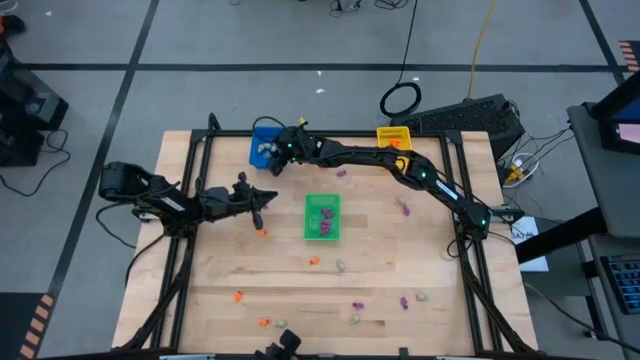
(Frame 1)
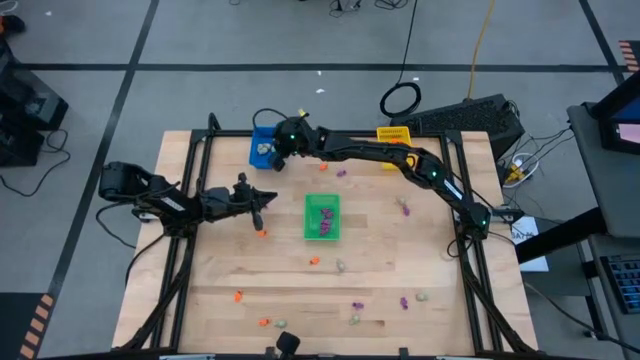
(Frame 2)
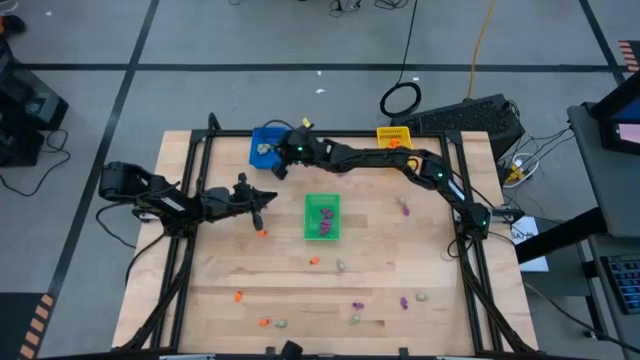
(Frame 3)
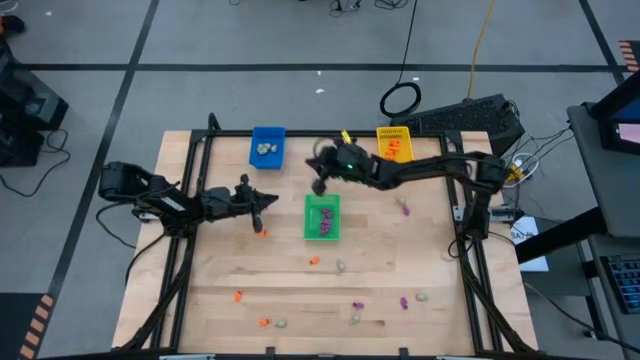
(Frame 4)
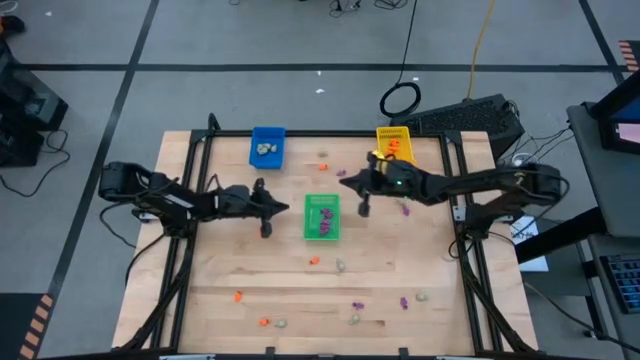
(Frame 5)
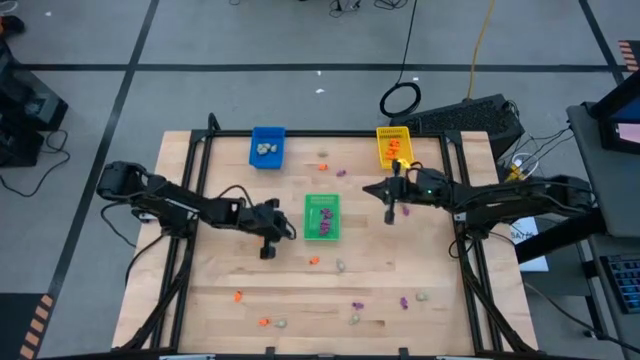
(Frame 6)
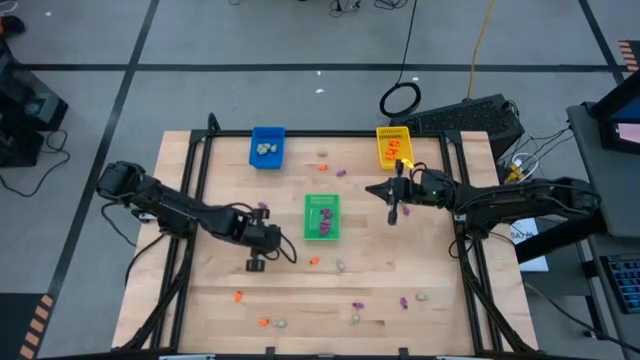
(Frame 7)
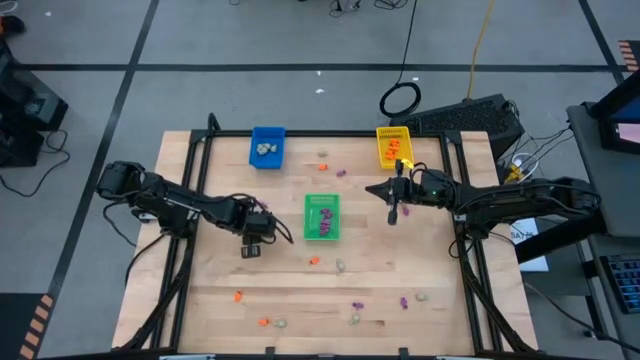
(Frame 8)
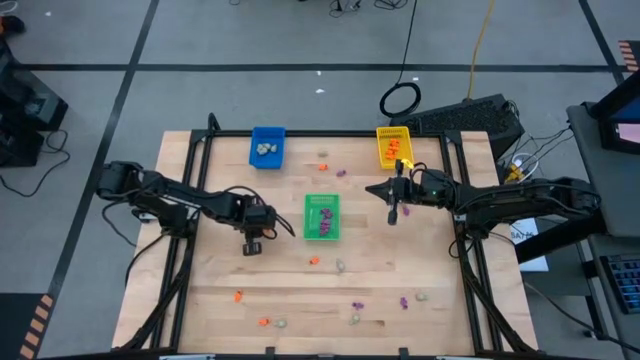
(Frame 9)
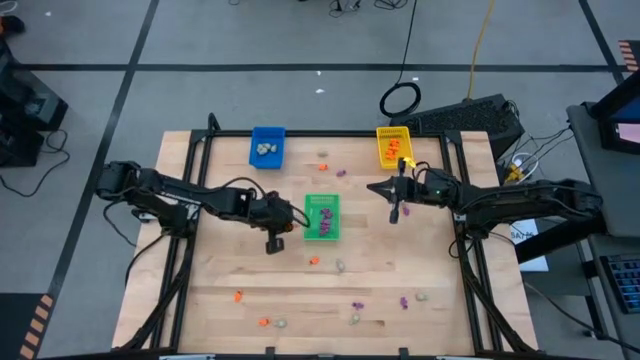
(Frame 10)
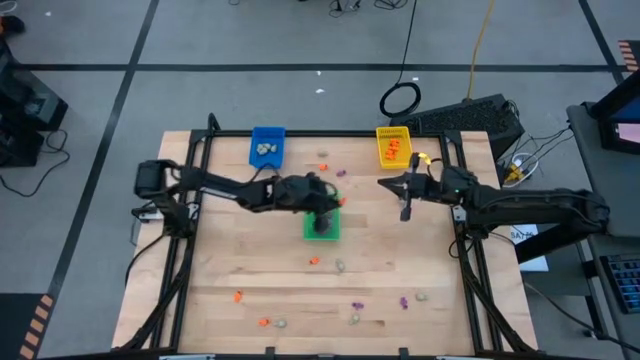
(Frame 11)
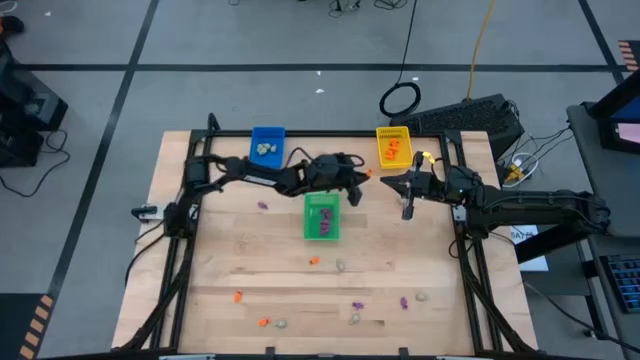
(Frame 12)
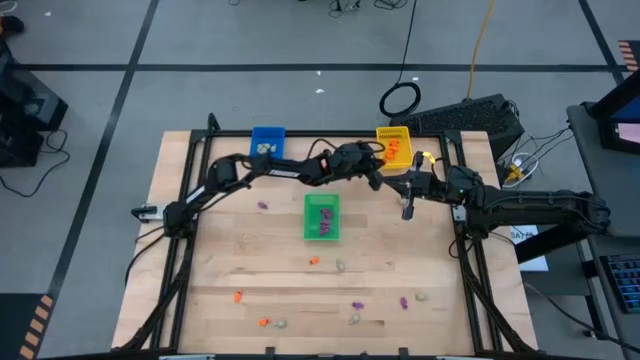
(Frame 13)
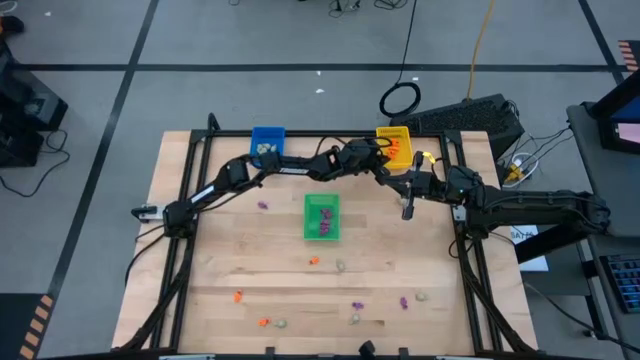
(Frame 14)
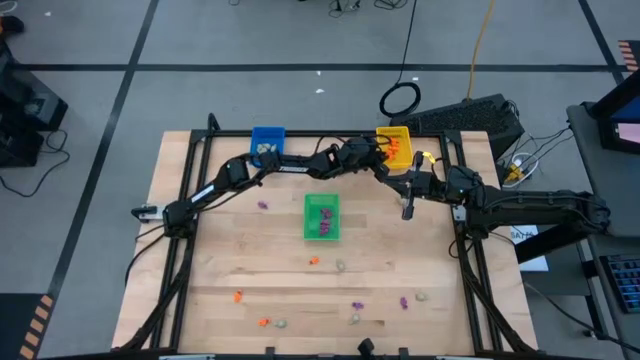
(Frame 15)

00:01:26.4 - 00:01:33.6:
Task: Sort Halloween decoration
Put the orange skeleton toy into the yellow bin

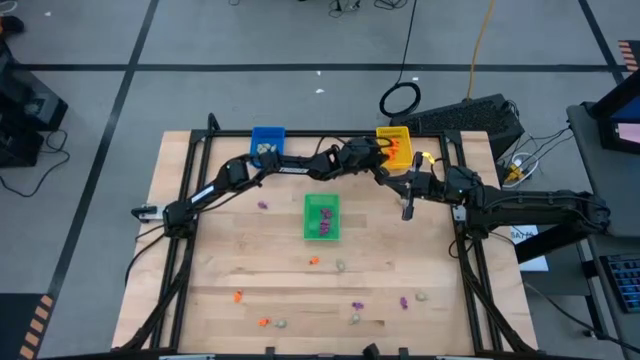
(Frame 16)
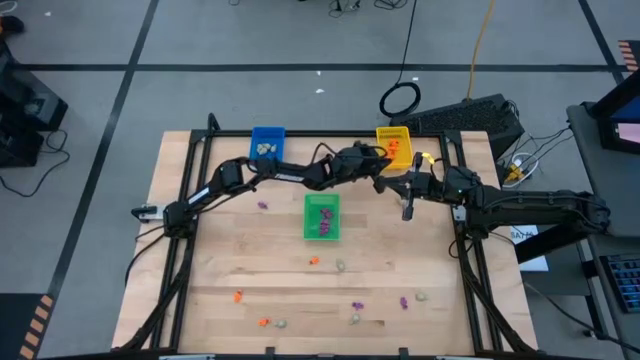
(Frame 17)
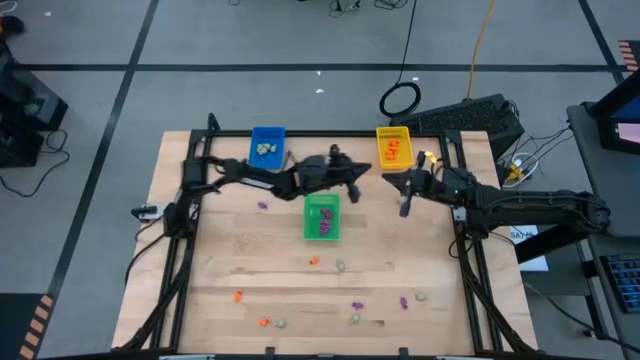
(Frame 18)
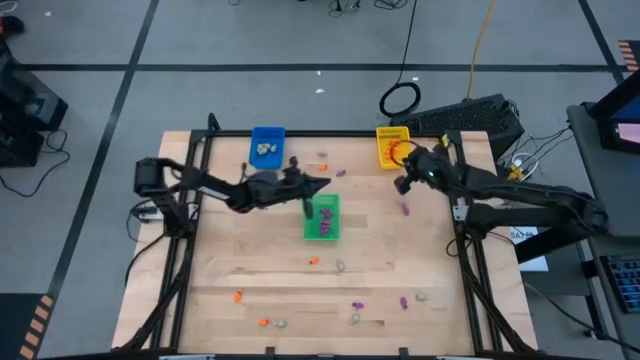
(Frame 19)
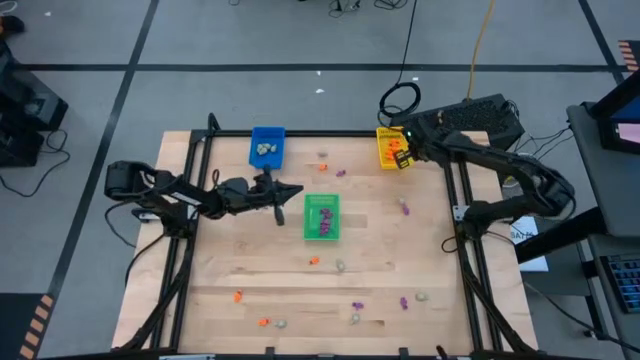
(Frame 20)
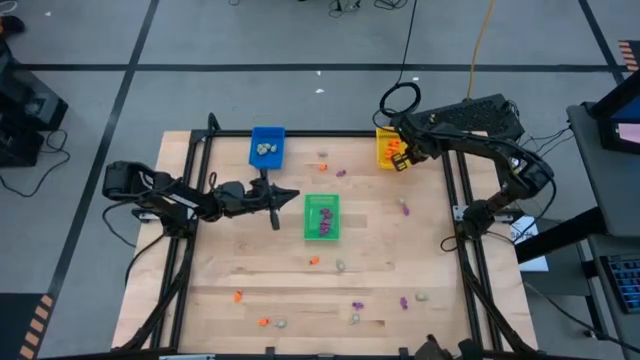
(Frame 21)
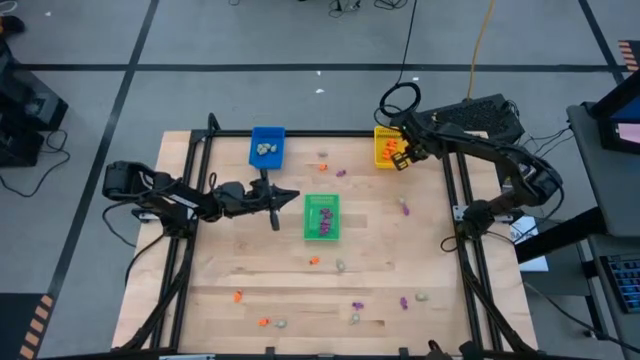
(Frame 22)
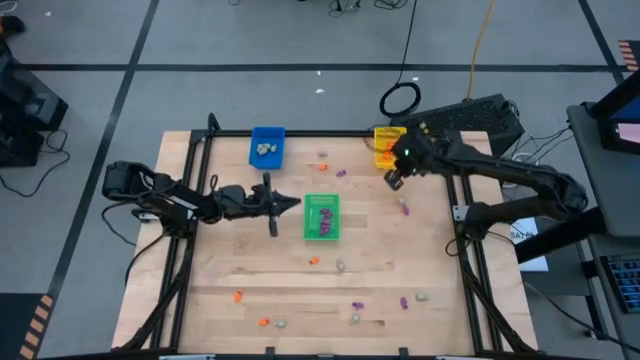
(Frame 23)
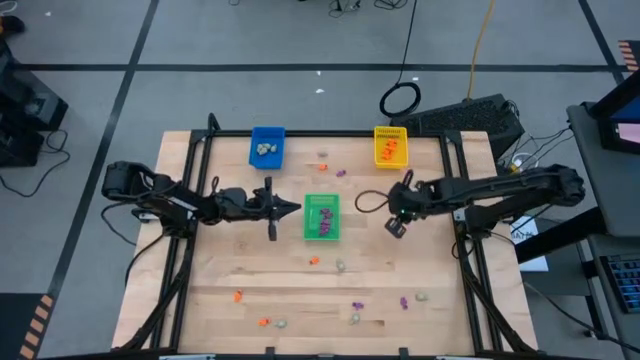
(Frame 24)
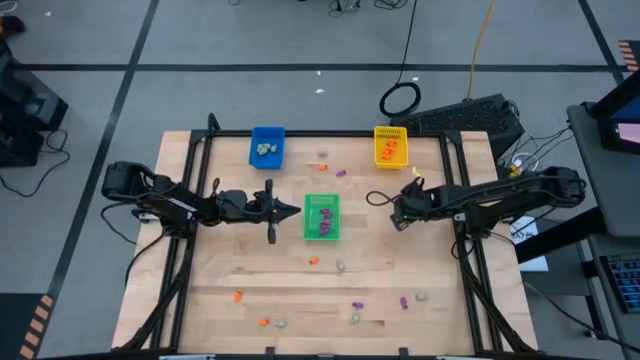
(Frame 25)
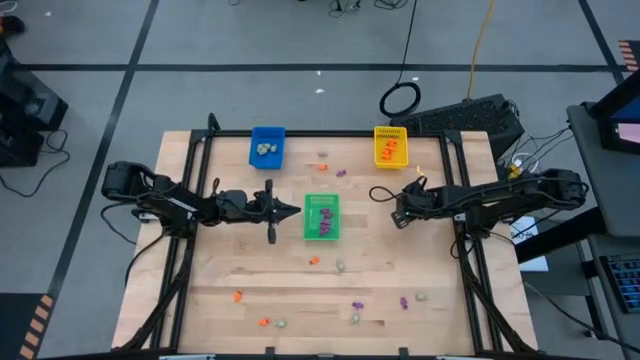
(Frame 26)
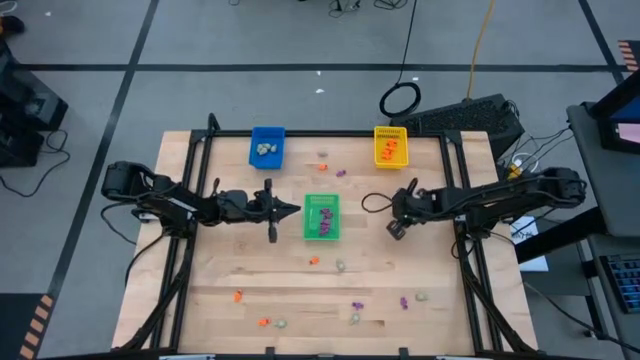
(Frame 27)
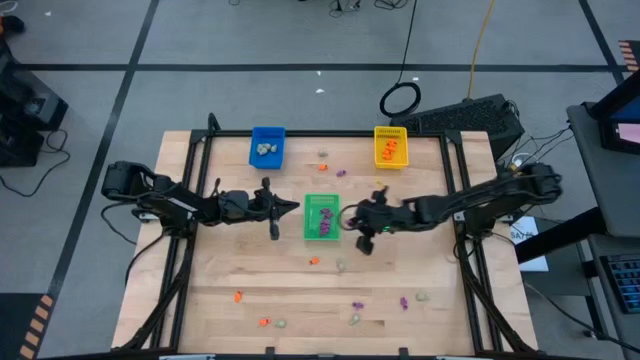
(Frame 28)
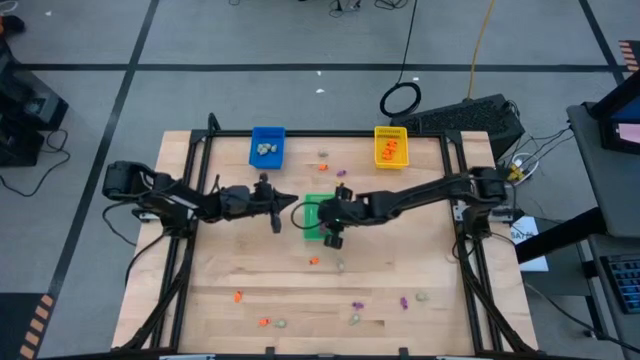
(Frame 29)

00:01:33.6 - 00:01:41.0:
Put the purple skeleton toy into the green bin

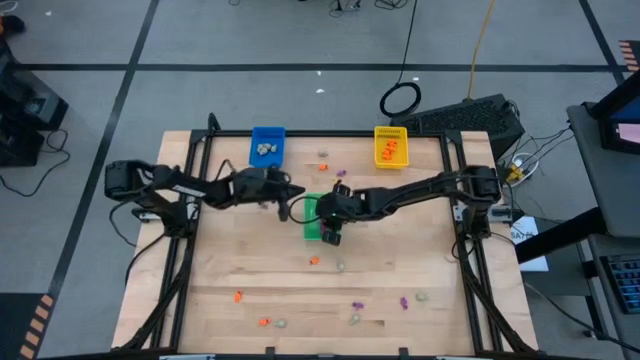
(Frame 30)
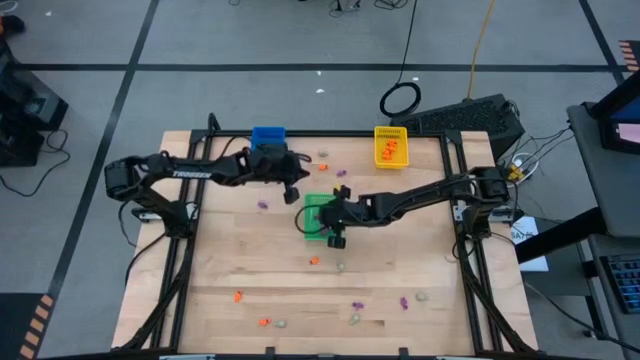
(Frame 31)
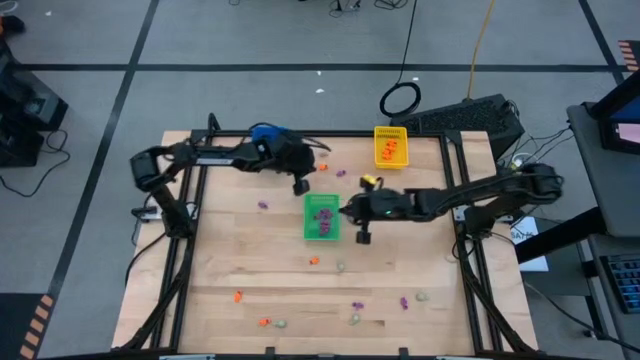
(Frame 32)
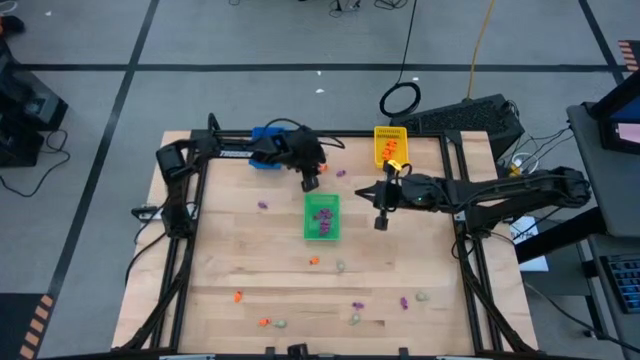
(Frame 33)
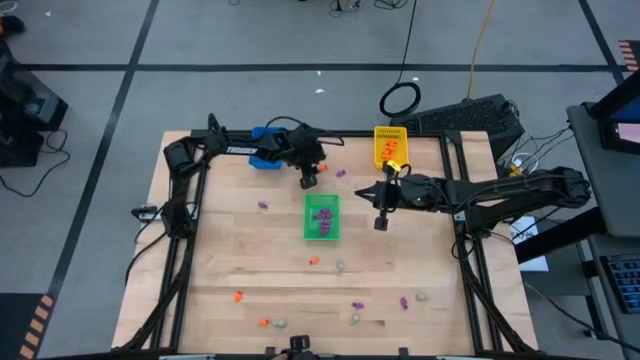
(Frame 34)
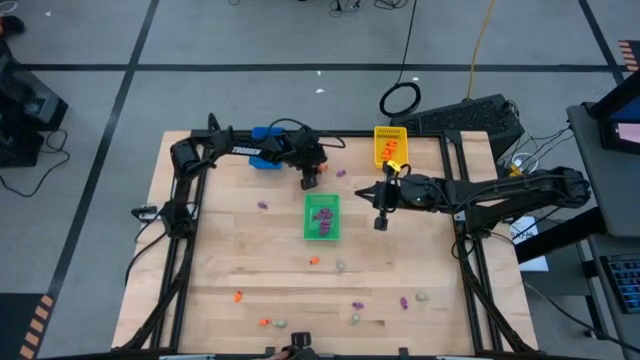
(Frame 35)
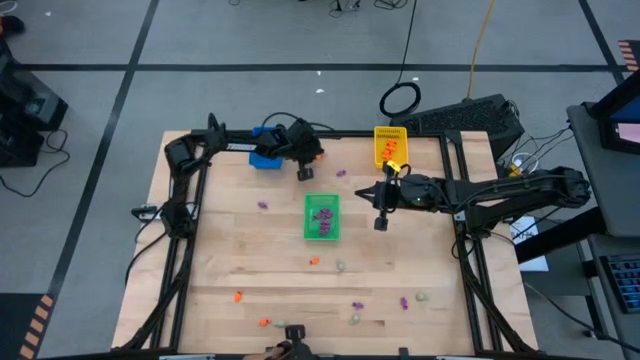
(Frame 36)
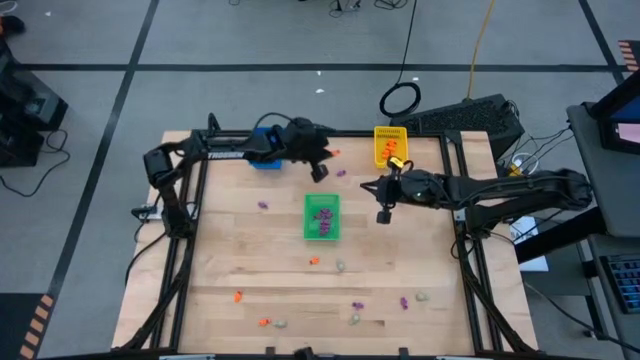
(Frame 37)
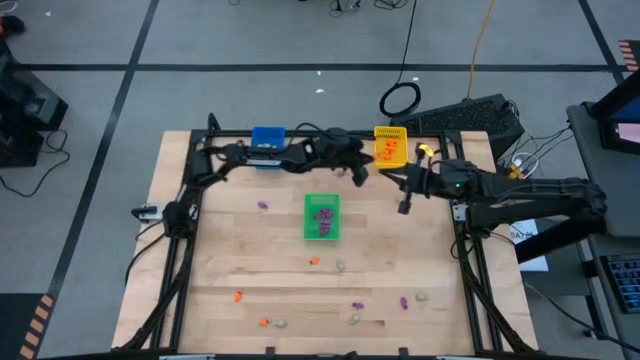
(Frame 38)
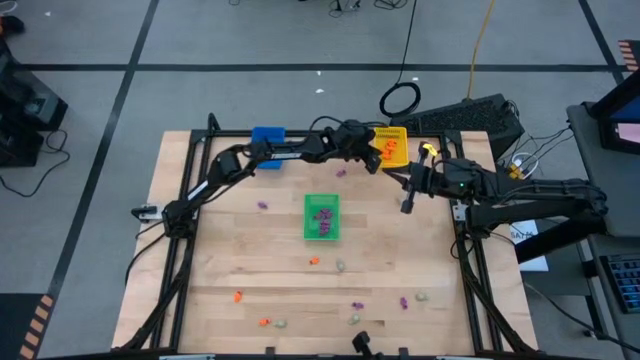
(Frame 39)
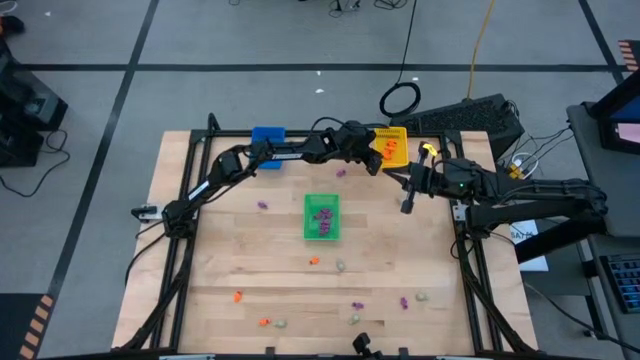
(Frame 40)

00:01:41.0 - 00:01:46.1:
Put the orange skeleton toy into the yellow bin
